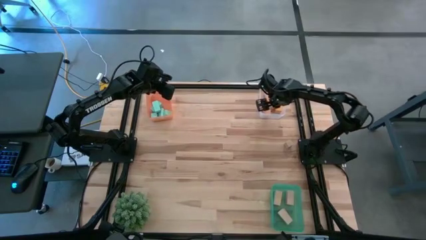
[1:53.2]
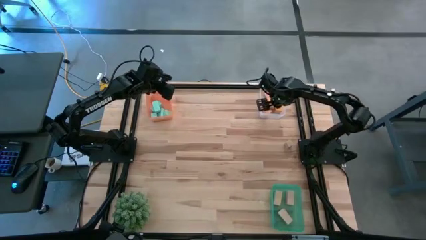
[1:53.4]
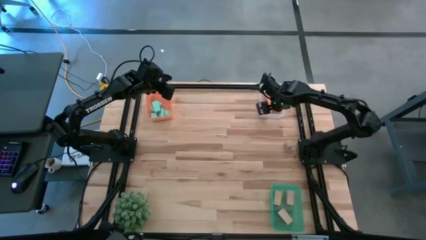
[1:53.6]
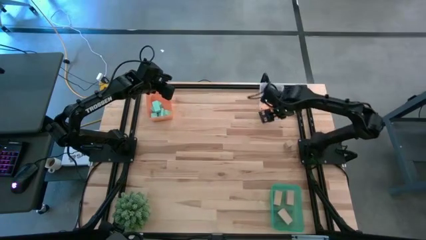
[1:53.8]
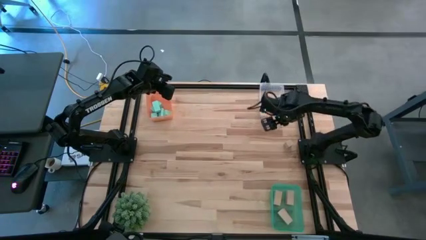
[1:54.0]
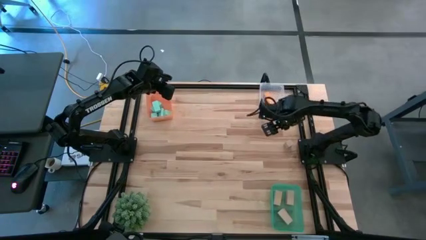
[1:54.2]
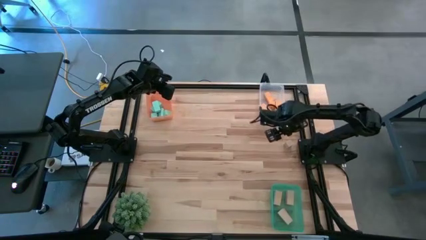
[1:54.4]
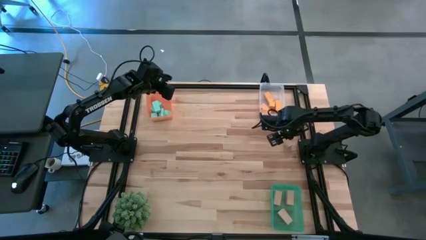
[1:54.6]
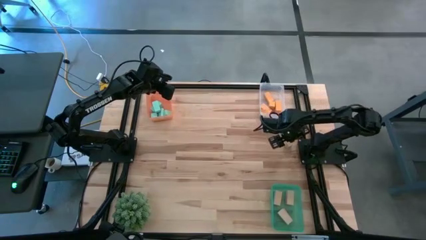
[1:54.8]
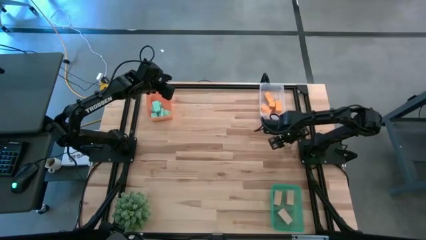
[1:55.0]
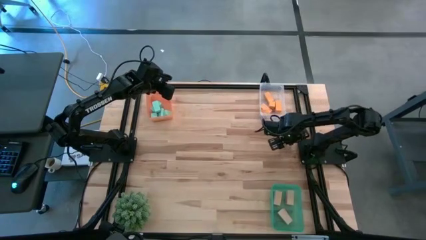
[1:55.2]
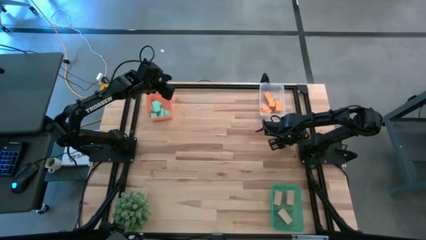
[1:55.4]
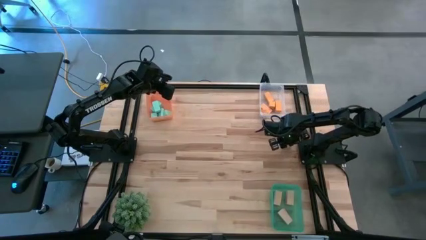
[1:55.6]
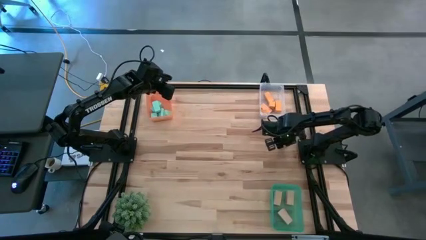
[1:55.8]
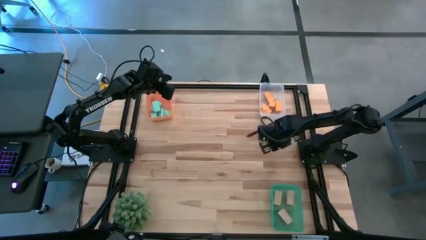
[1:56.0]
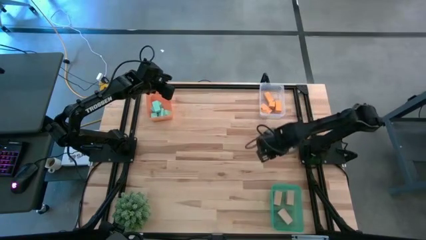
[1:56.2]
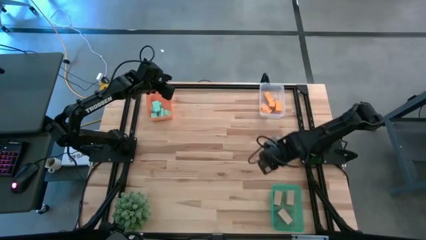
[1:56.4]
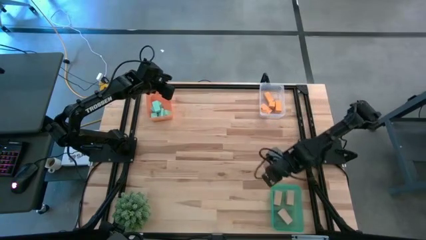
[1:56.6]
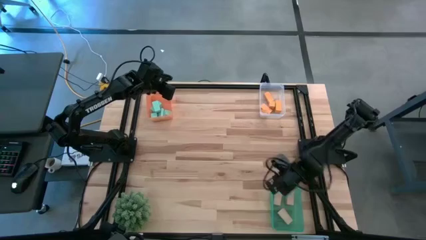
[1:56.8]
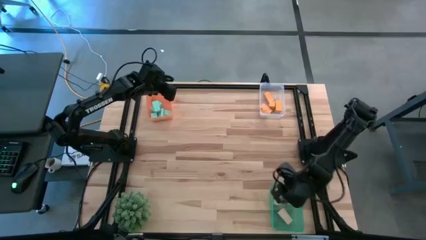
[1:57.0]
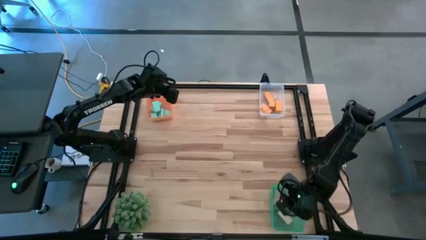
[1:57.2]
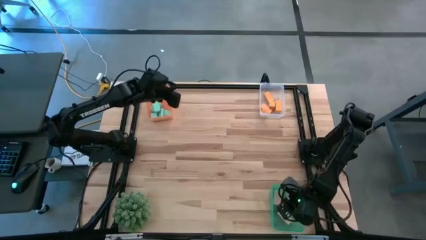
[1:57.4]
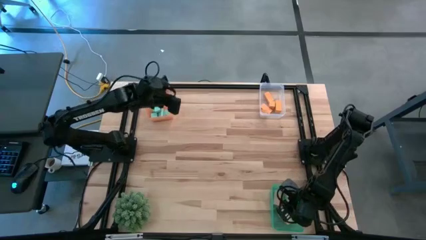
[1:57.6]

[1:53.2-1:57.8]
Task: Sort & place blocks by color
Put the brown block into the light green bin

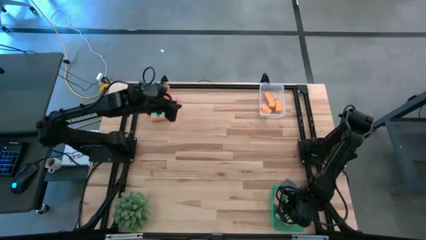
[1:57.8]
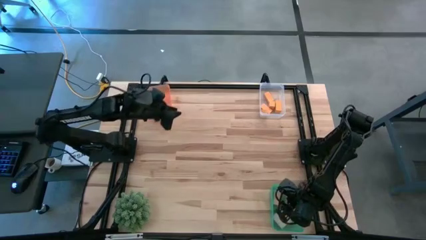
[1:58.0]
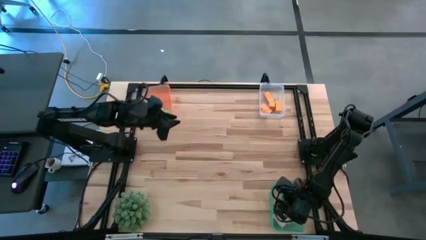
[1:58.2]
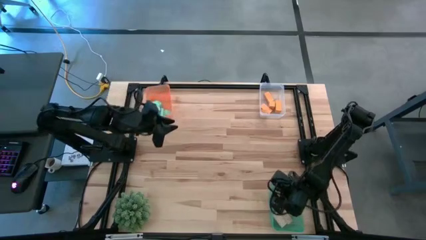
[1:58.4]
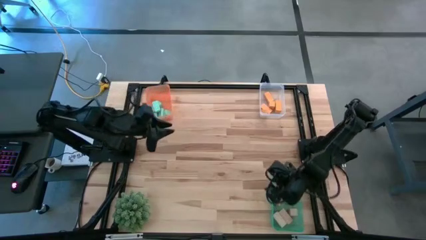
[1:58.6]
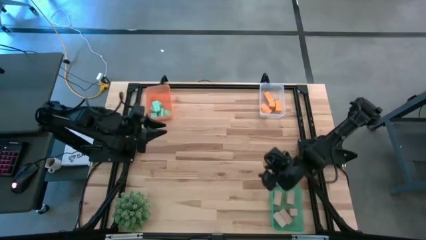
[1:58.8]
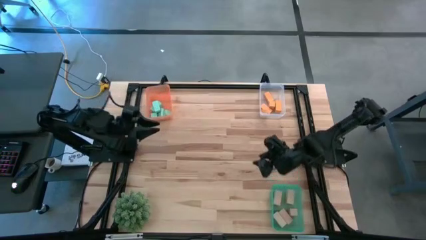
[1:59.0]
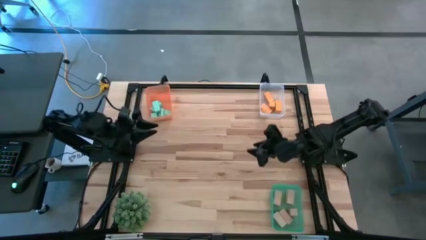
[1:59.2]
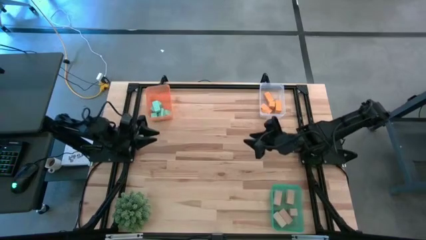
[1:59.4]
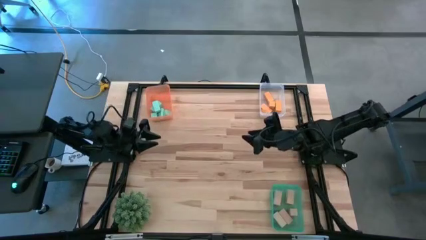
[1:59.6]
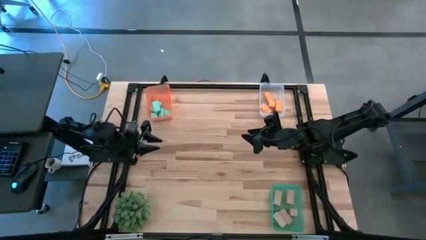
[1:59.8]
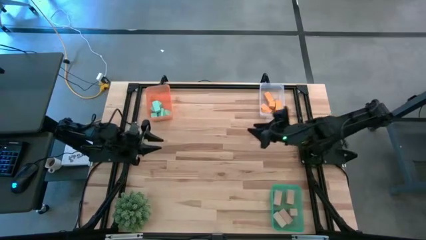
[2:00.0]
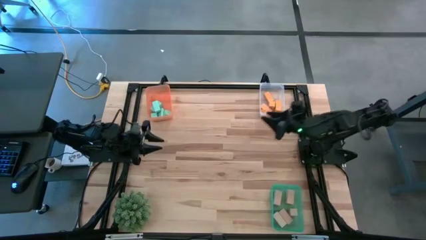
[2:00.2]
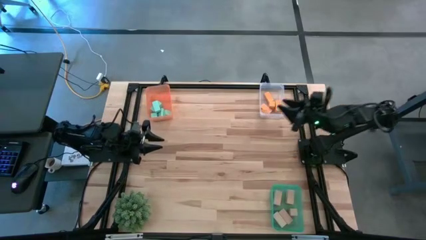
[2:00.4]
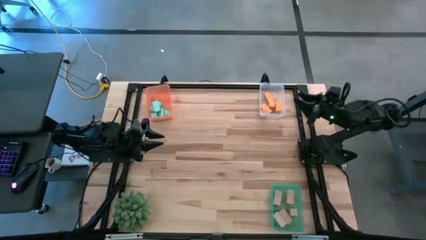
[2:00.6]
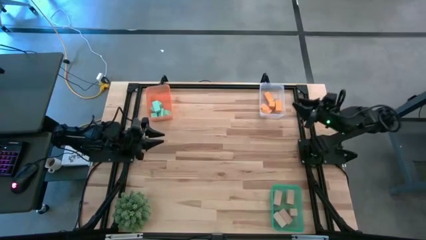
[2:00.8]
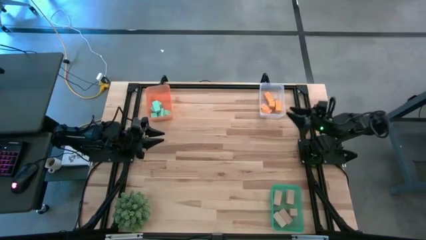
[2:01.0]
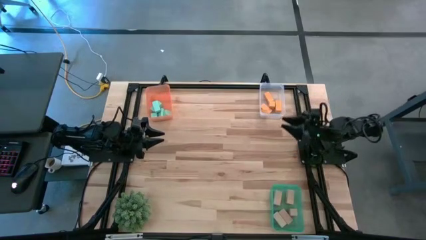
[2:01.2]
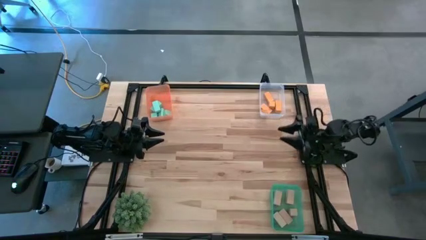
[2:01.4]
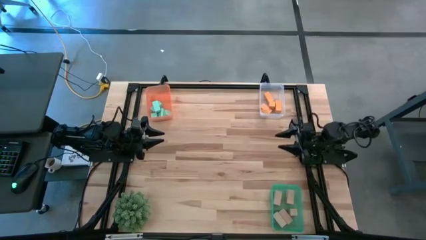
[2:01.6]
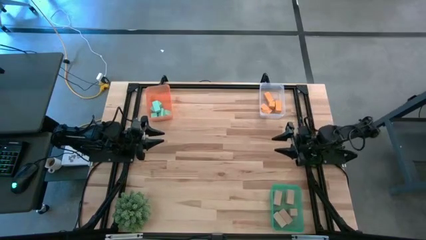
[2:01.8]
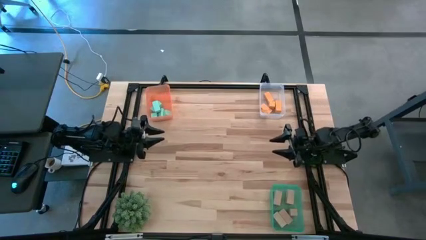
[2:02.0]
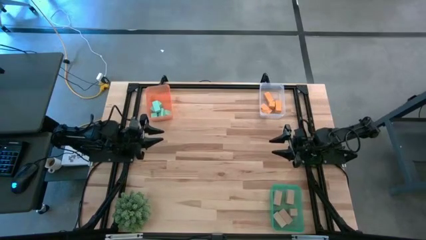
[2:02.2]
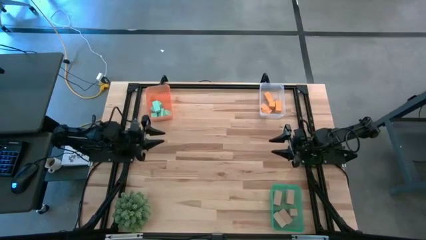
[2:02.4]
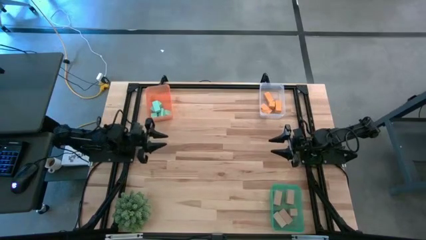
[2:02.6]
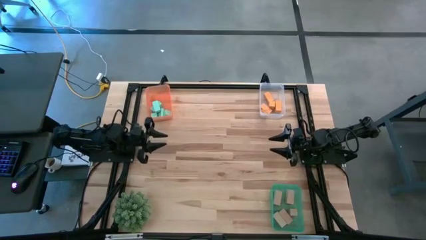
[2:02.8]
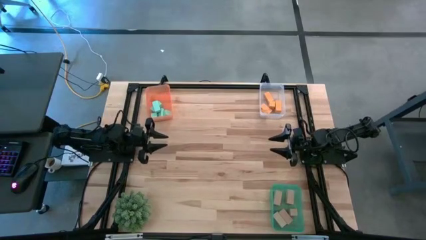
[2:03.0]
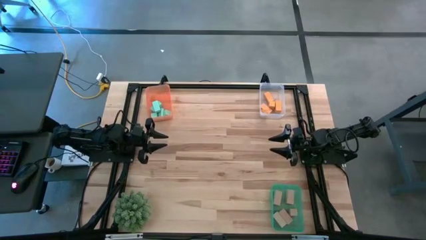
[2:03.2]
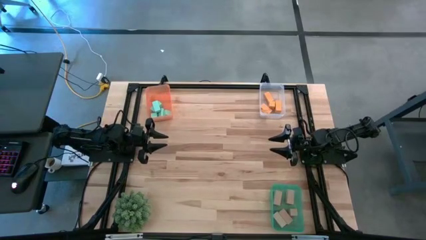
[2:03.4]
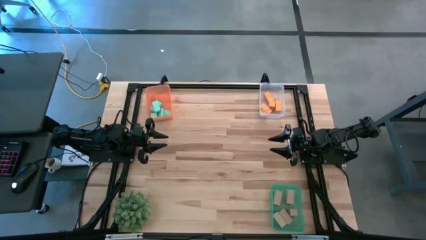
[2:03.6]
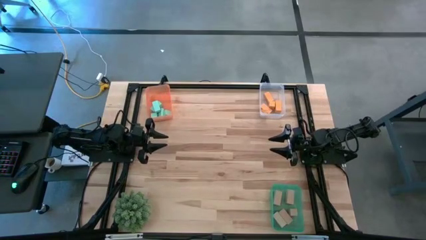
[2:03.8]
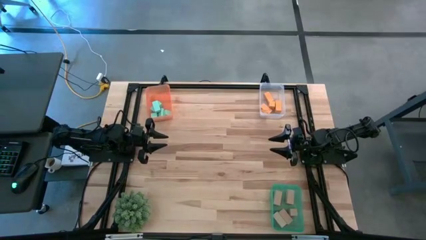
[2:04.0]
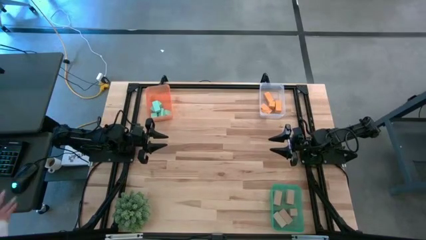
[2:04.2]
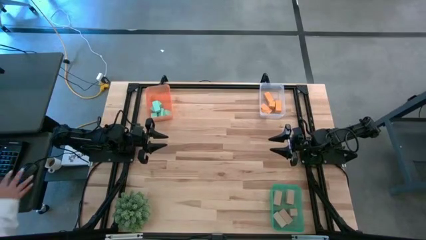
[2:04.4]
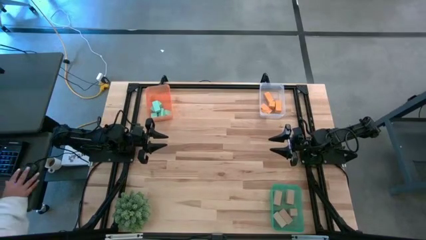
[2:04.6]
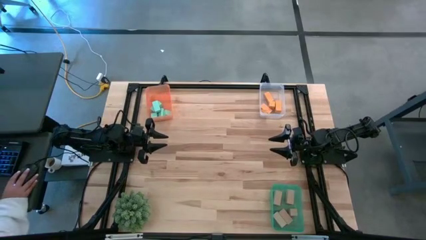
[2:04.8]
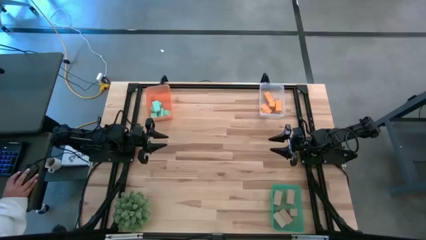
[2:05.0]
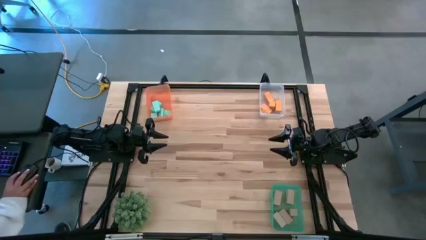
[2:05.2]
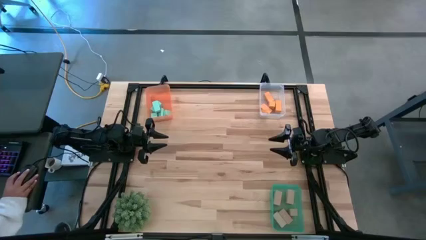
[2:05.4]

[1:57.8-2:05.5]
Return to Home Position

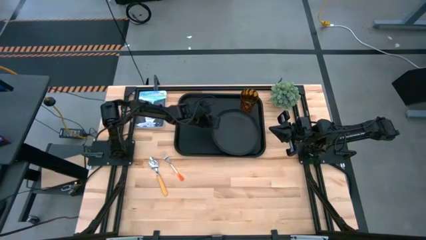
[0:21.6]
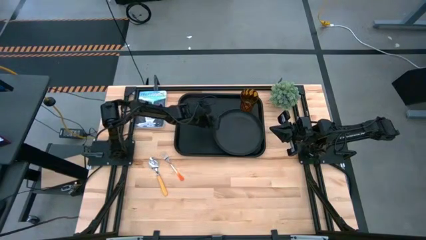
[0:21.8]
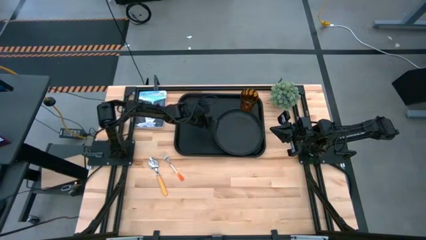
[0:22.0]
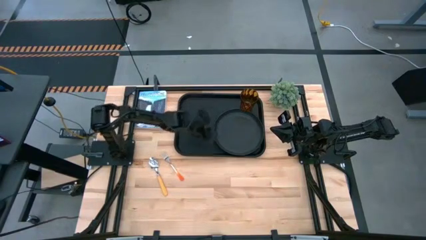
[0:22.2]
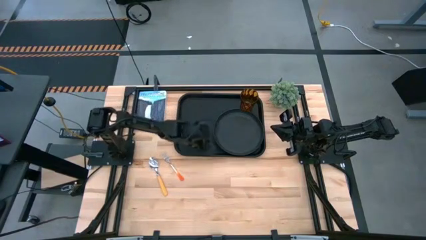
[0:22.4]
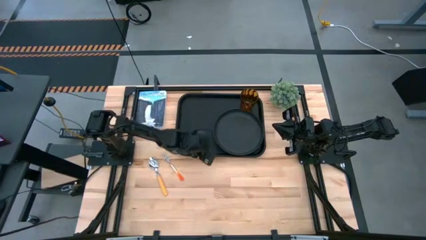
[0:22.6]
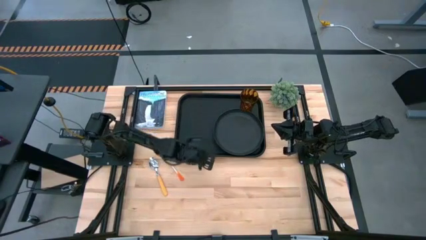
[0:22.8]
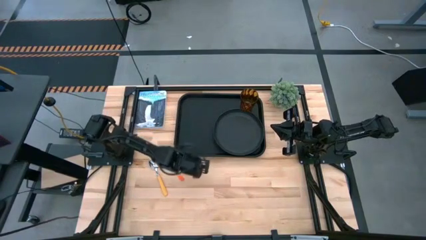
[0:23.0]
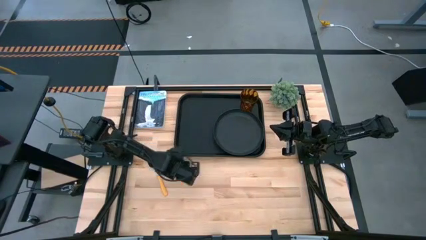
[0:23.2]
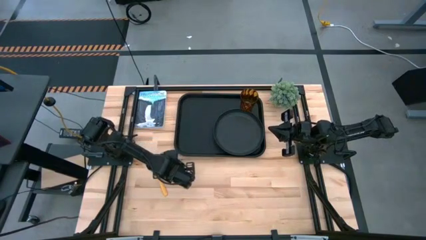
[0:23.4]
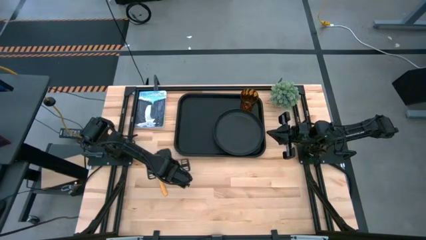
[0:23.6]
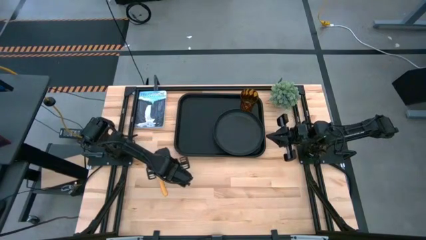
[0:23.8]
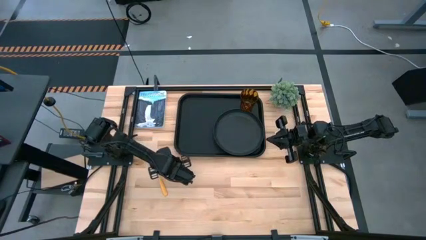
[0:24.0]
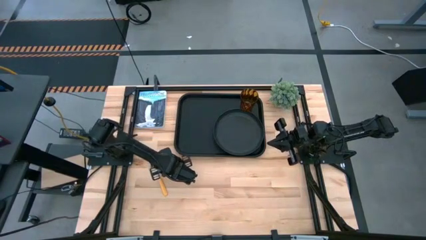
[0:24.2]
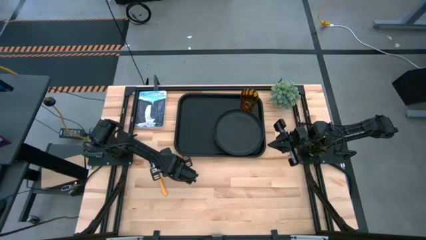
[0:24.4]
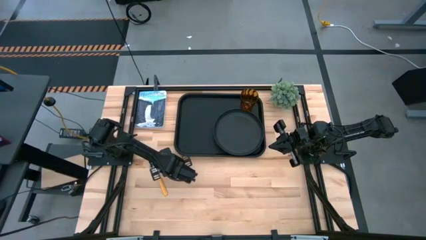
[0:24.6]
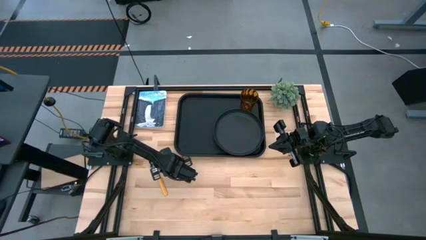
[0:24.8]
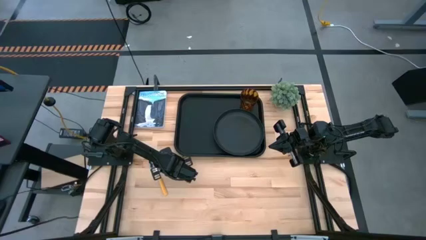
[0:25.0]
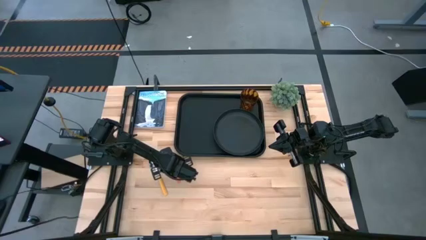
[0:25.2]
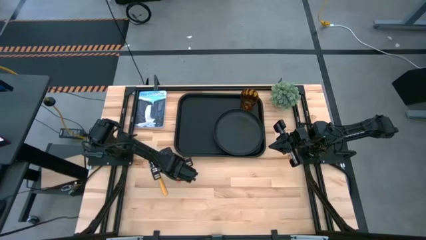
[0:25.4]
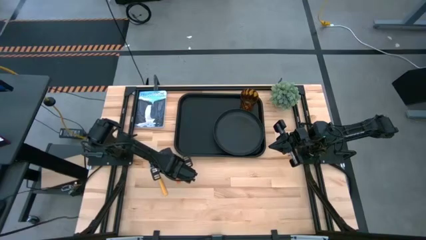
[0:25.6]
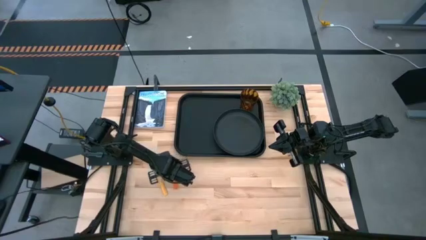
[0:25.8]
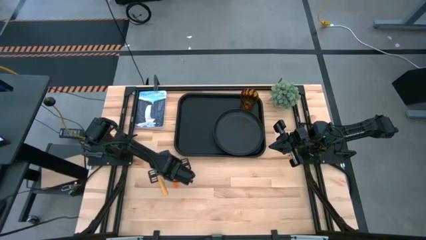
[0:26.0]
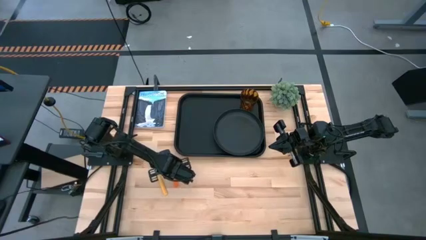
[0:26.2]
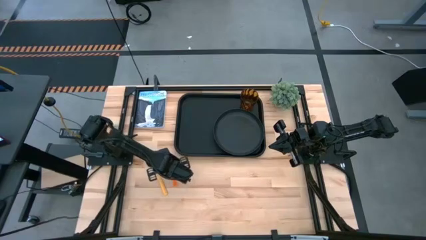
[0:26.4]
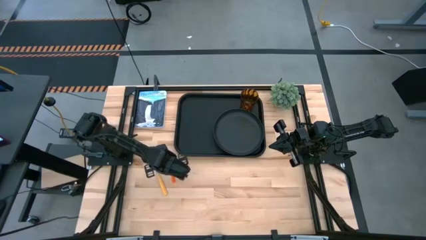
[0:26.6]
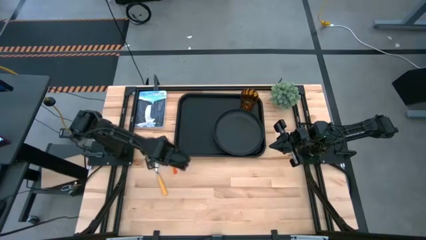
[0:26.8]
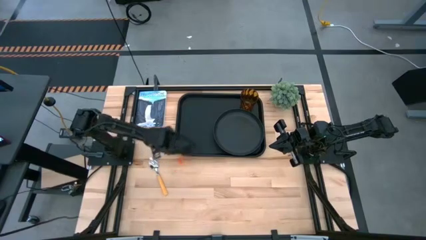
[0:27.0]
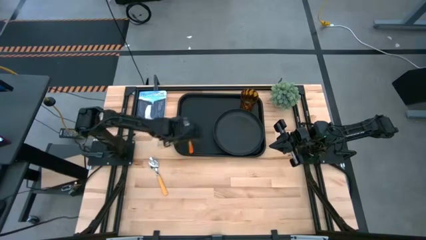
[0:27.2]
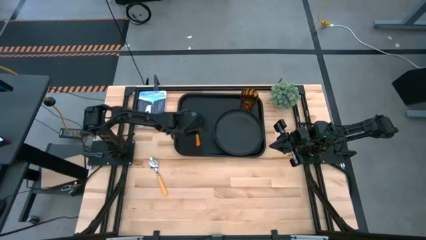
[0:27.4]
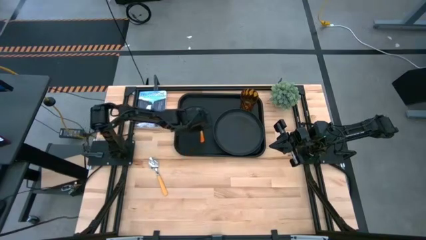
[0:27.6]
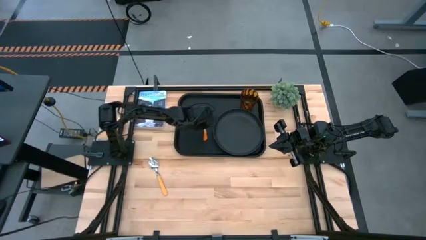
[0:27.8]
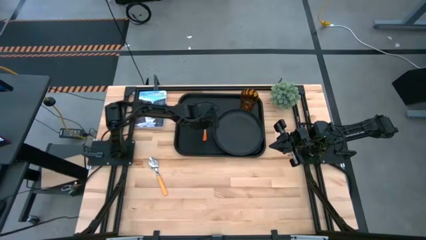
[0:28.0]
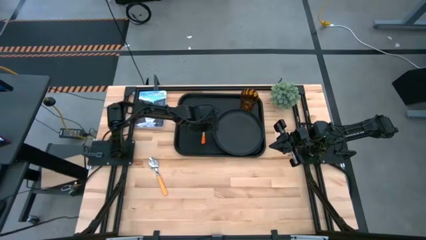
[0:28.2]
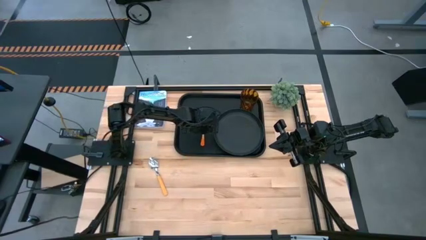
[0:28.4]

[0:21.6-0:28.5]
Task: Pick and place plate/cup/fork/spoon on tray
Put the orange fork to the left of the black plate on the black serving tray
